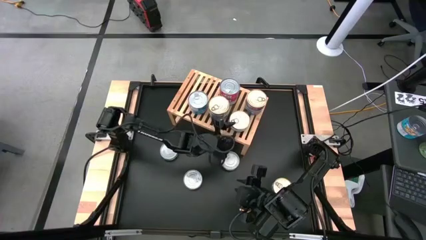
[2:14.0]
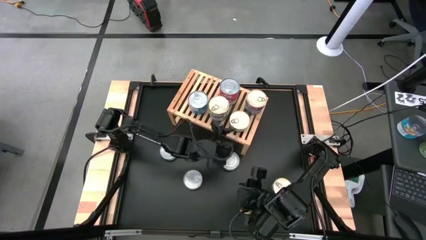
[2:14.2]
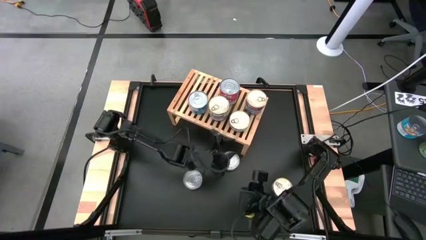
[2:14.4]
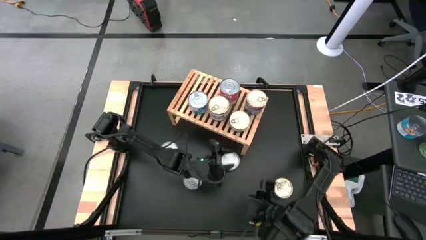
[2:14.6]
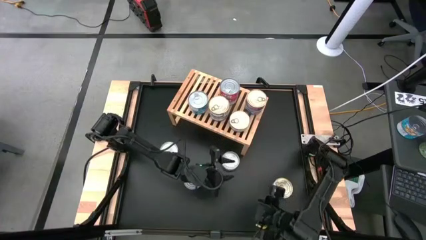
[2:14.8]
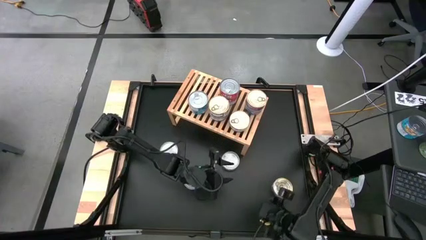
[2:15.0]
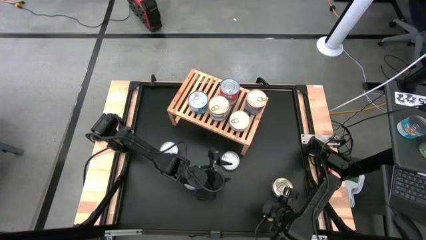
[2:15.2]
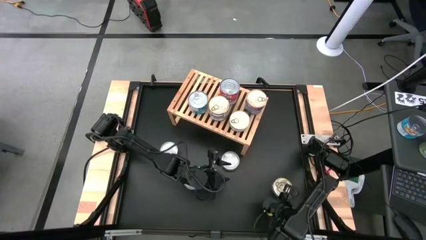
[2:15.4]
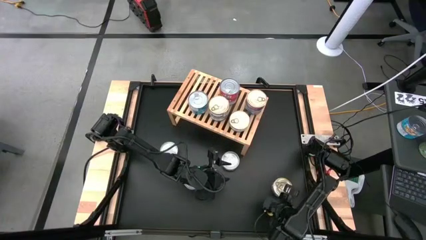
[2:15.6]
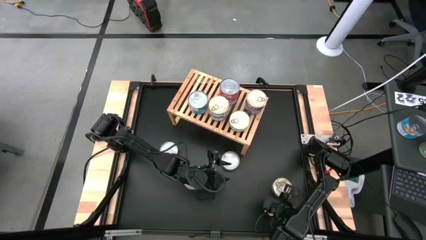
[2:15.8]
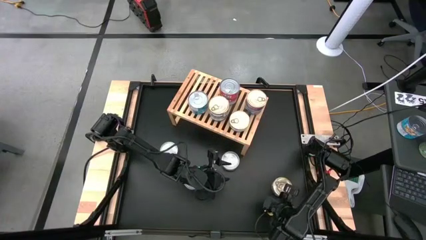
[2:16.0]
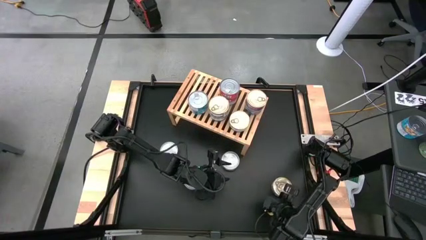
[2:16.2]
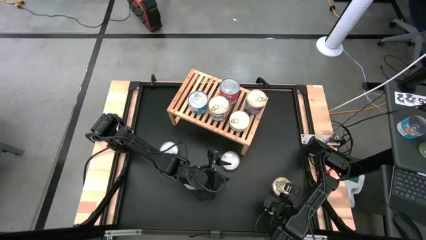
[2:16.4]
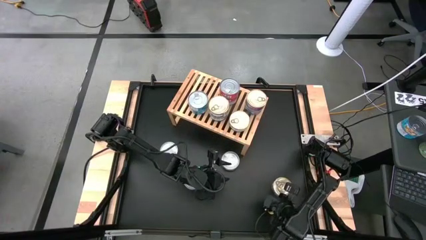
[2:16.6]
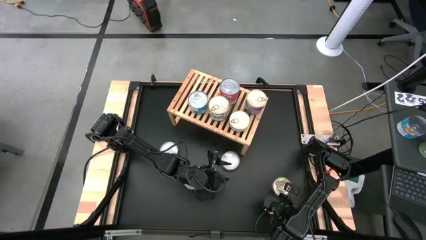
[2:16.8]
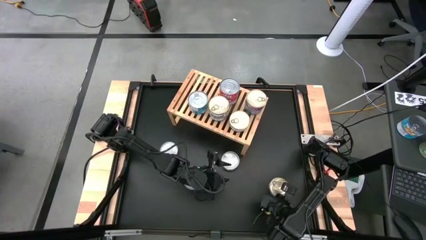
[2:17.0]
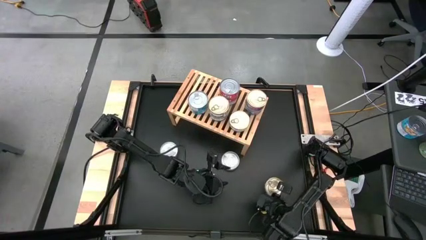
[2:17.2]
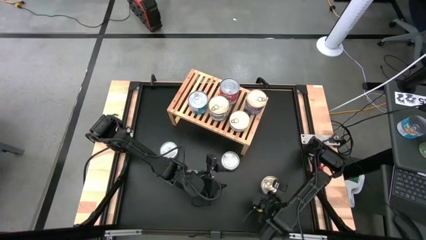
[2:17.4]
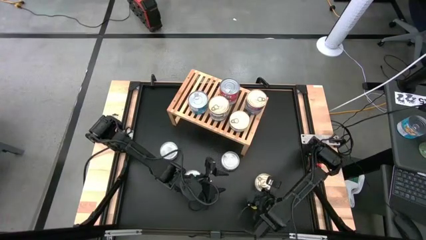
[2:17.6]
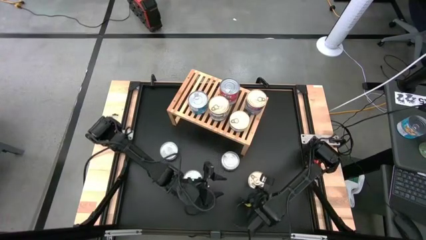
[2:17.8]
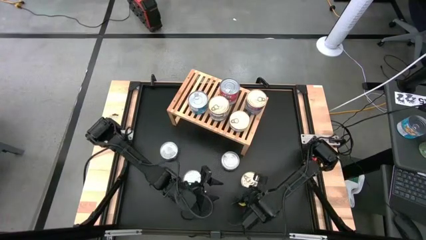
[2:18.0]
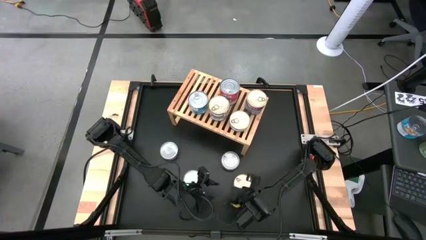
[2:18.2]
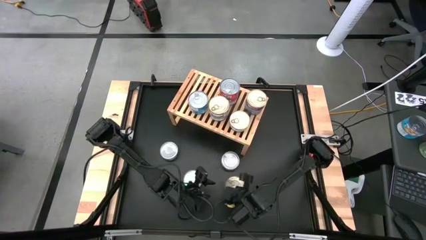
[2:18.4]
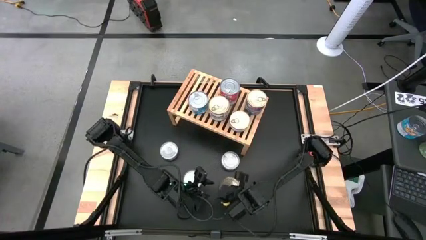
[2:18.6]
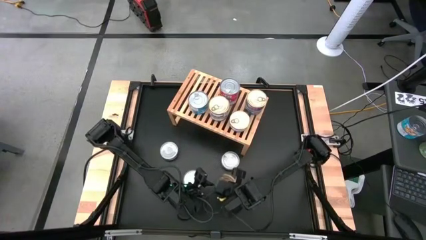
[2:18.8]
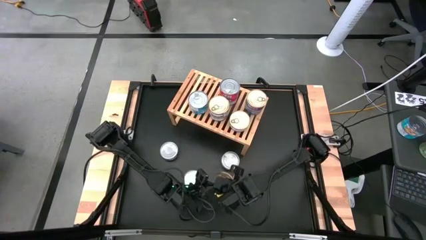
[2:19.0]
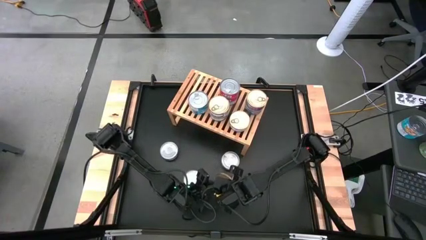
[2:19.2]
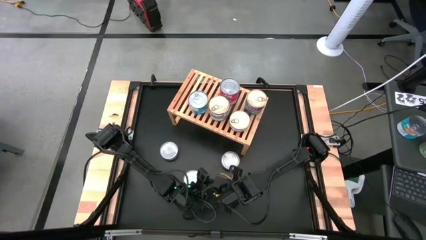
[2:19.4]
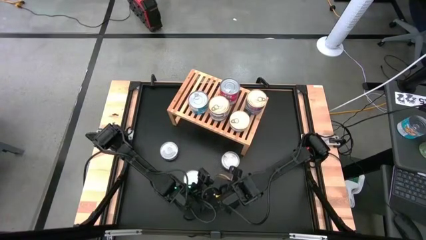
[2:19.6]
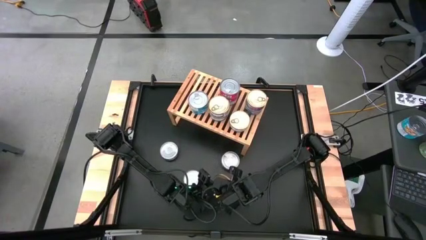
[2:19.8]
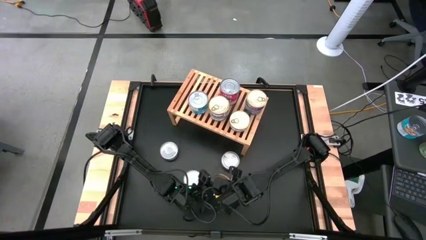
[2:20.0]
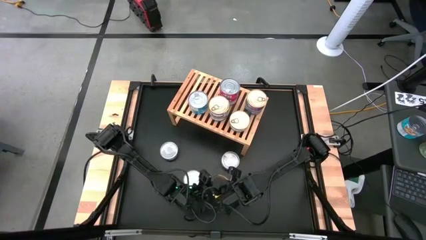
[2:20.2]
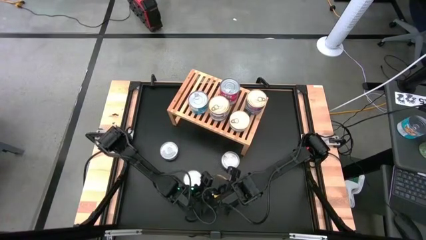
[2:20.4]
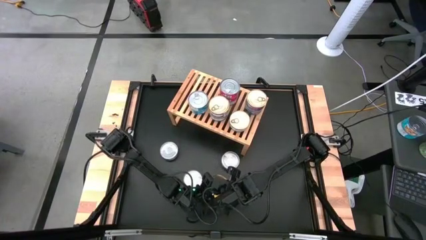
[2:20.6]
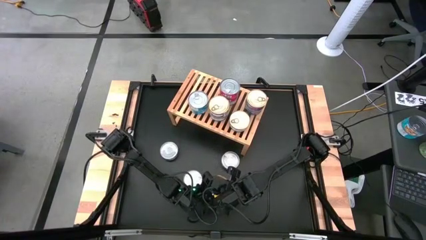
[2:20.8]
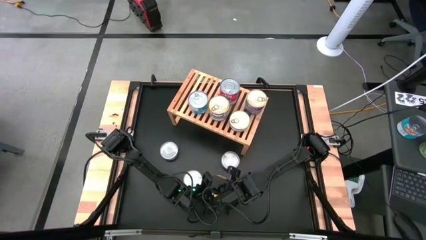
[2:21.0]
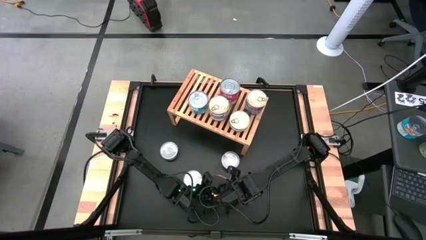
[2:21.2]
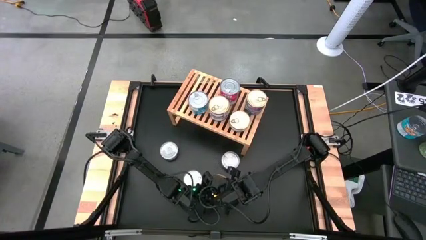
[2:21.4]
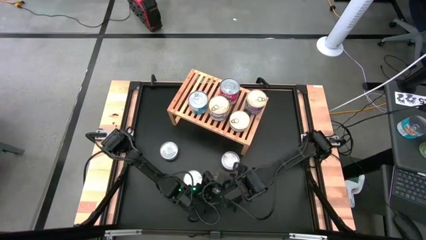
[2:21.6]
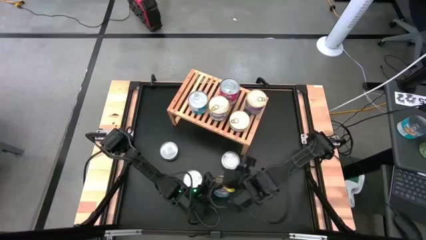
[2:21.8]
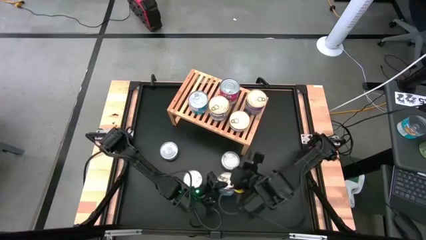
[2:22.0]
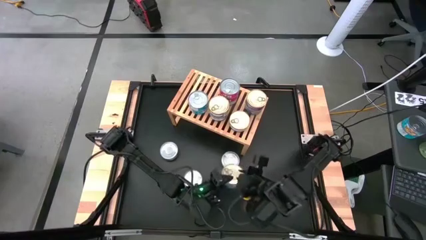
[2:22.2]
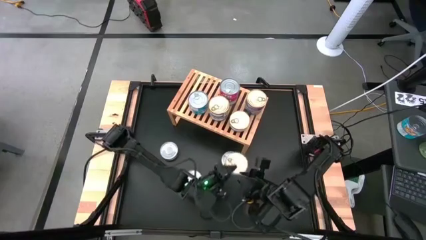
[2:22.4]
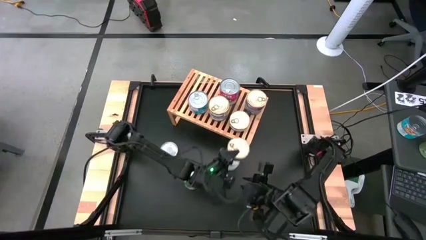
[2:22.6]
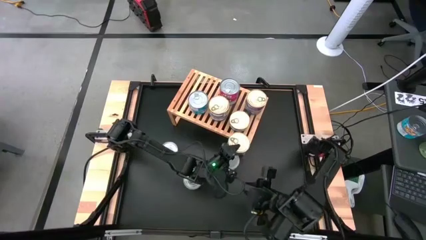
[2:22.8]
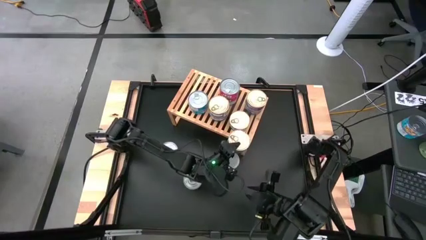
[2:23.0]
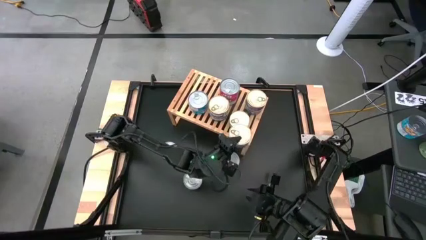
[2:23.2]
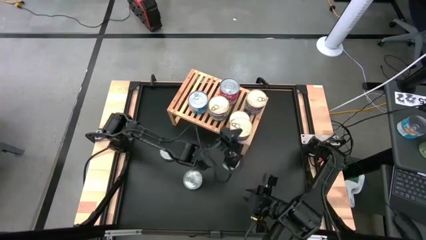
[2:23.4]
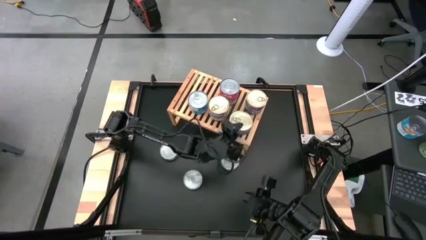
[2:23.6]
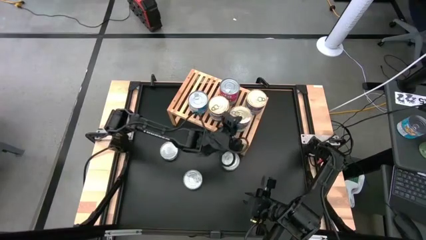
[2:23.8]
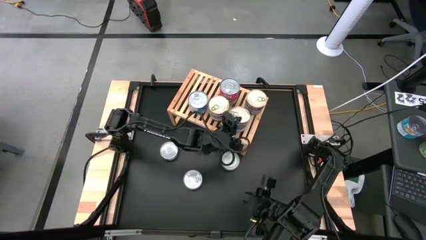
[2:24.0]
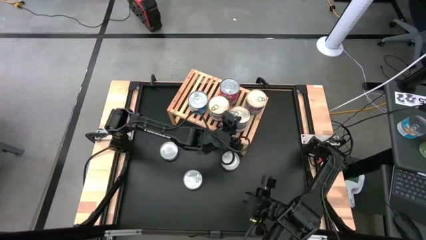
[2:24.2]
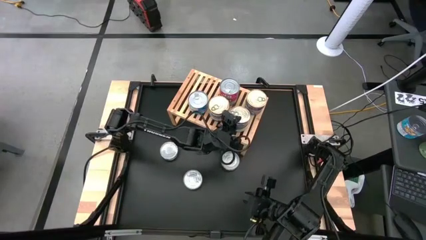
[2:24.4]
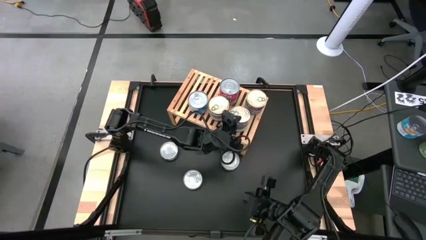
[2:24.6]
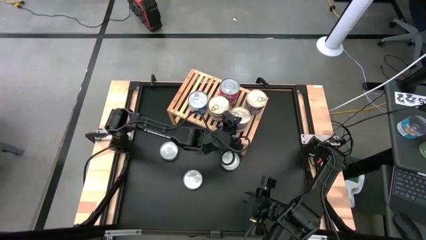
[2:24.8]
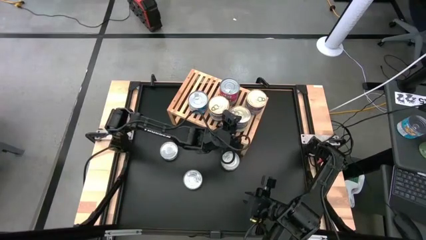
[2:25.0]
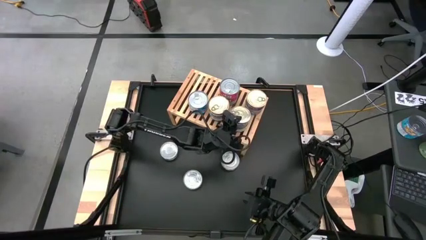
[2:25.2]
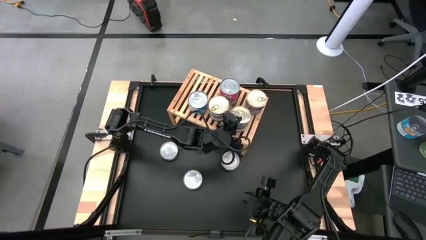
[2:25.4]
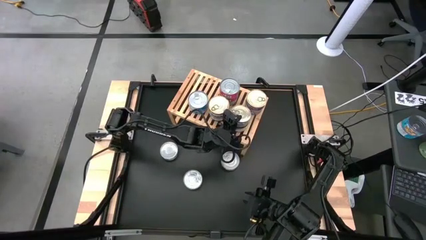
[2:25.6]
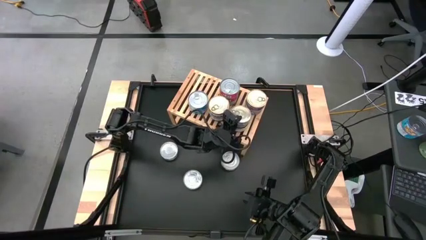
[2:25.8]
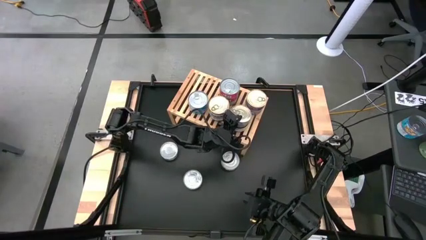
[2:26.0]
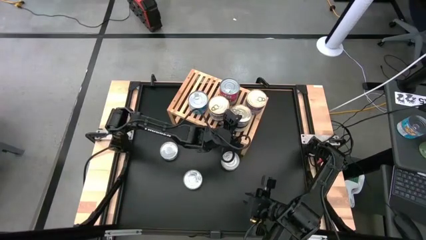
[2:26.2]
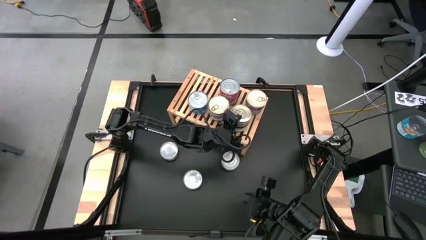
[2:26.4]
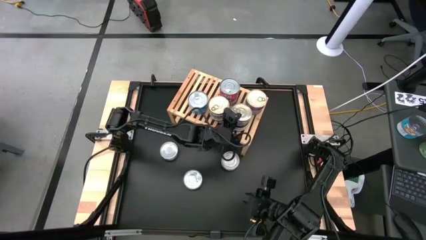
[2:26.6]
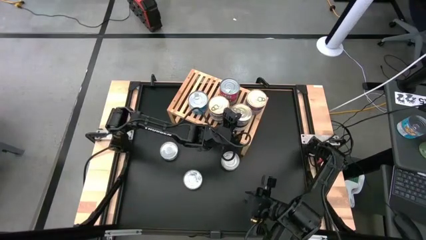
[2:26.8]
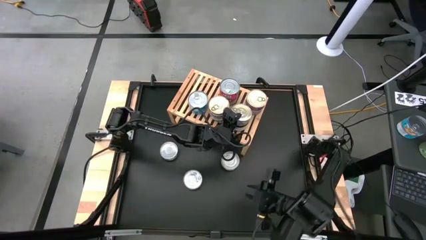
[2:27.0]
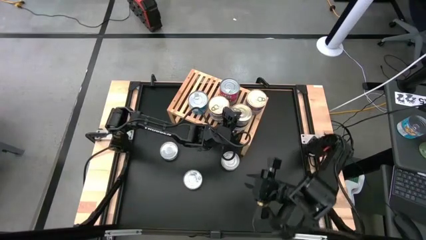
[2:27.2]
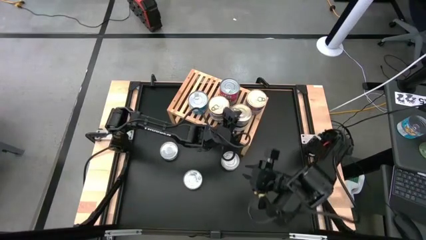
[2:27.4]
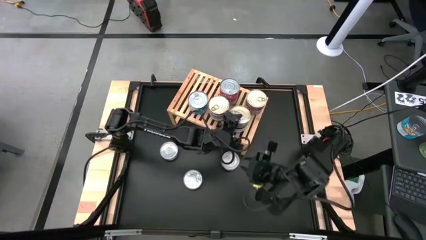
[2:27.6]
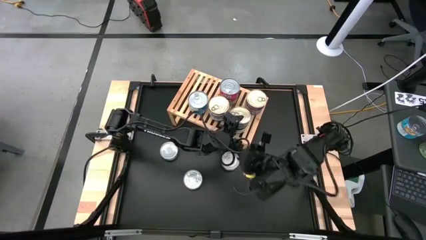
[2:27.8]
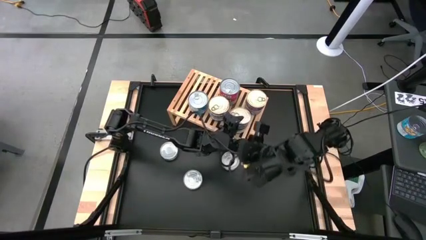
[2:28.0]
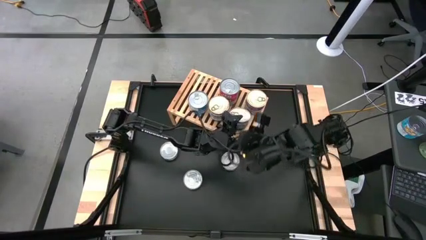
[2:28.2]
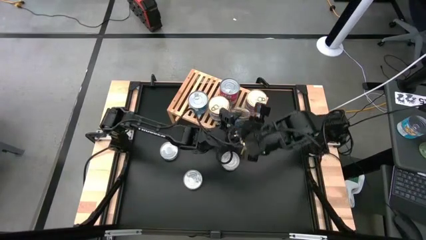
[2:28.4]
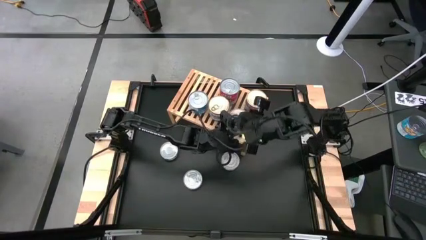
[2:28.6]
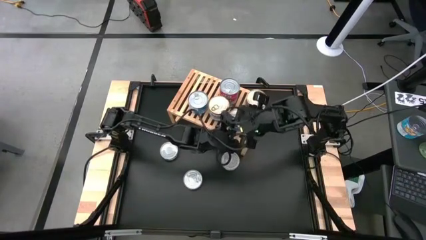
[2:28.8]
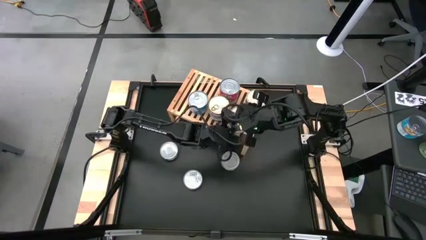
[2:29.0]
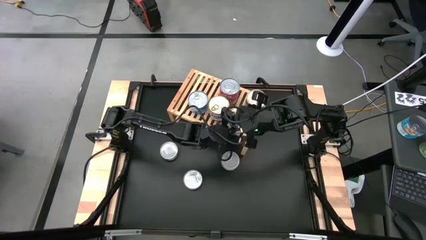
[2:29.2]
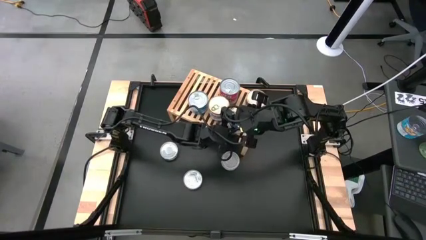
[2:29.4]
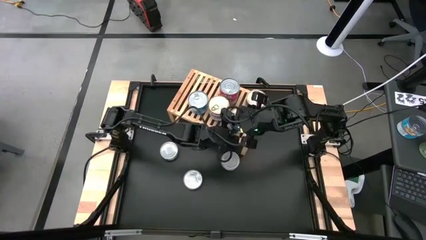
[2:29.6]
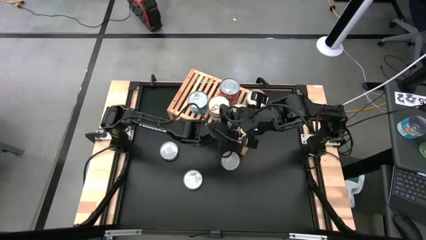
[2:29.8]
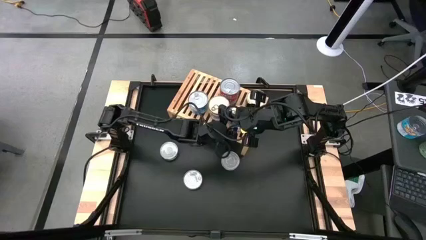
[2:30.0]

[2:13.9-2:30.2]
Task: Stack canned seafood by type on shelf
Stack the blue and pink tuna can on top of the blue and pink tuna can on the shelf

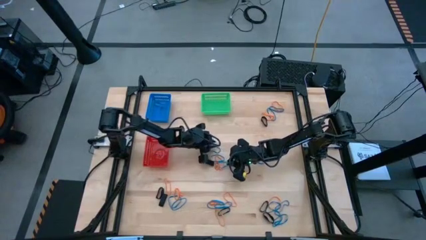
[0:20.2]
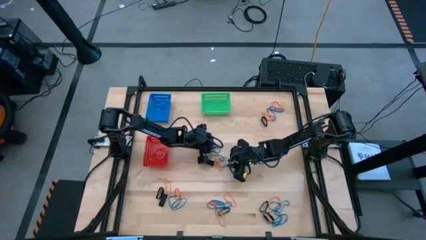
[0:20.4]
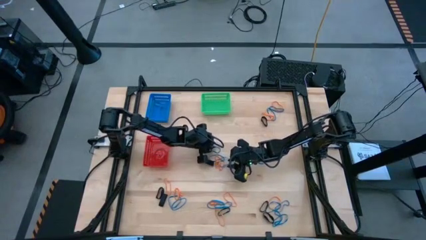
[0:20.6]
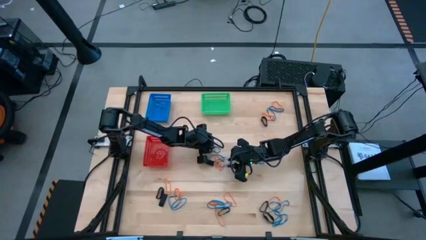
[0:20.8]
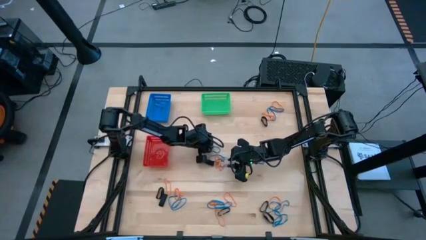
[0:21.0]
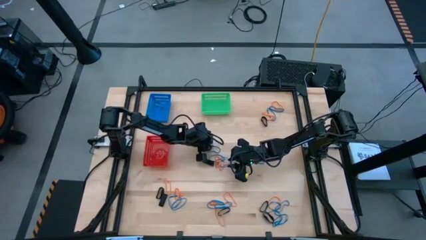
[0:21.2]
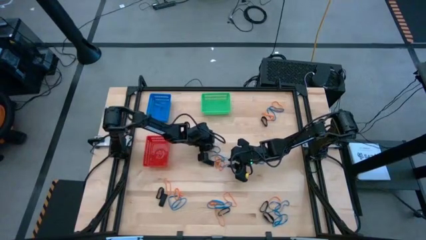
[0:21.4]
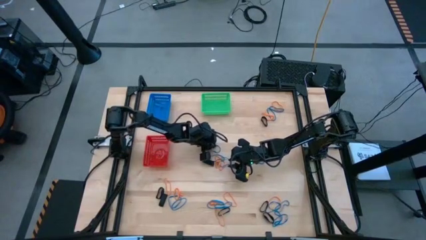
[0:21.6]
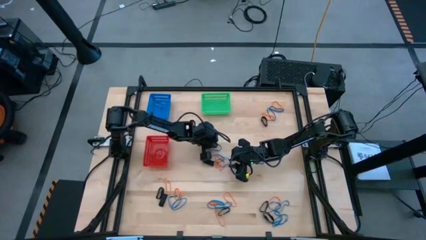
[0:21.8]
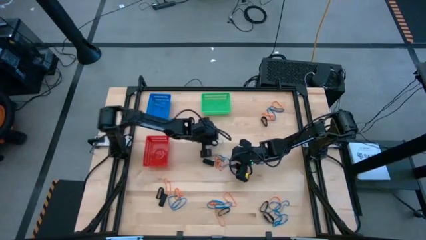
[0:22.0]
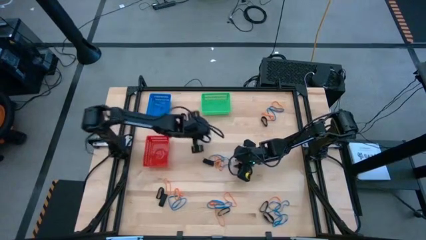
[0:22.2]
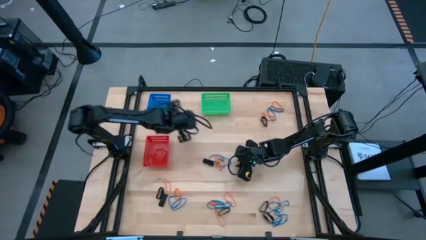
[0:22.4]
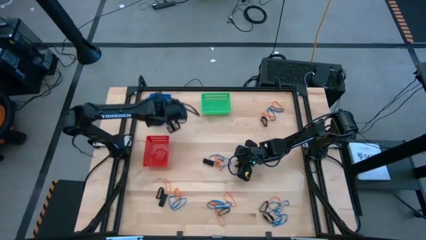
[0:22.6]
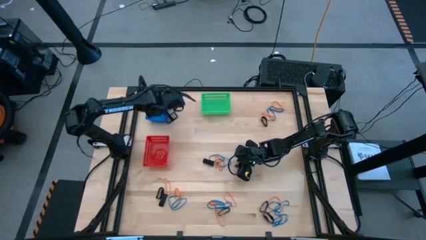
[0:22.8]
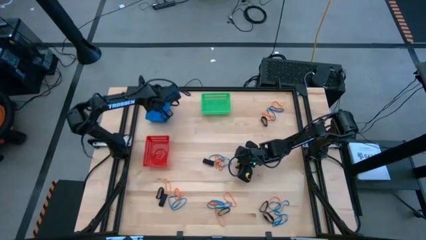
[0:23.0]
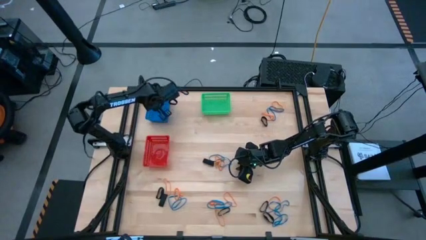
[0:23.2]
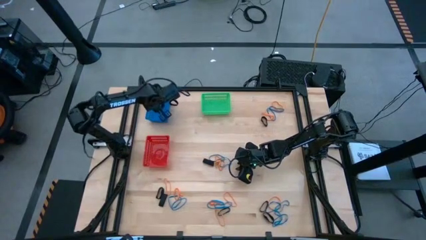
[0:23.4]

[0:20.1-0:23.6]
Task: Sort rubber bands into baskets
Put the blue rubber band into the blue bin
